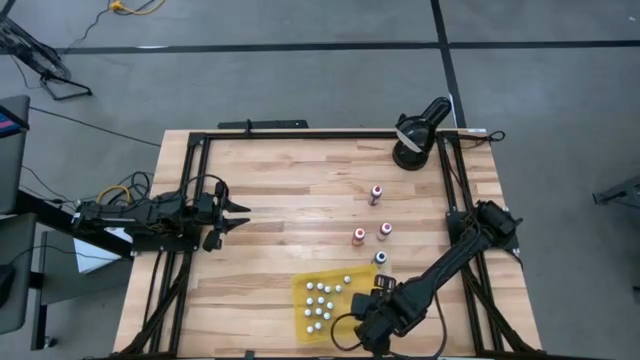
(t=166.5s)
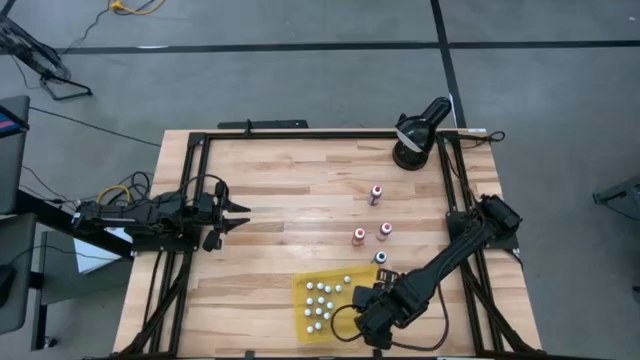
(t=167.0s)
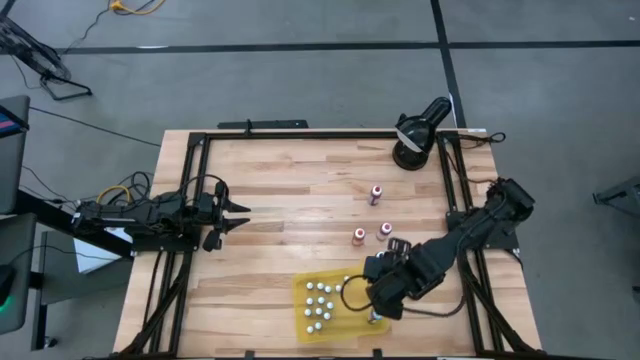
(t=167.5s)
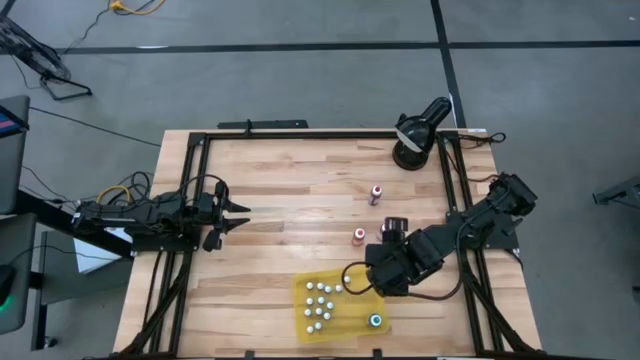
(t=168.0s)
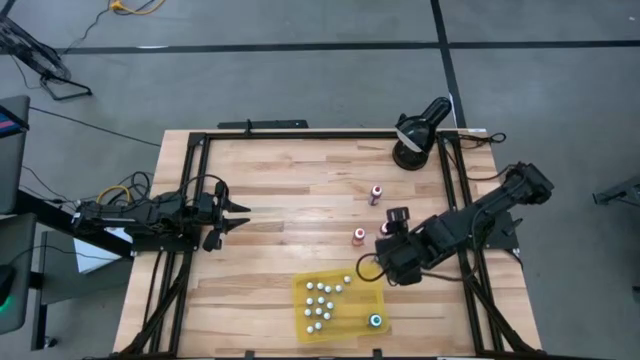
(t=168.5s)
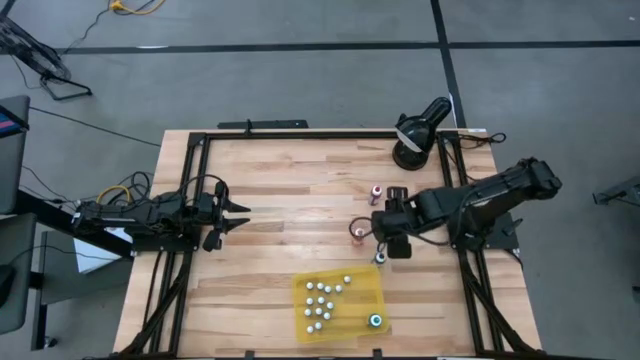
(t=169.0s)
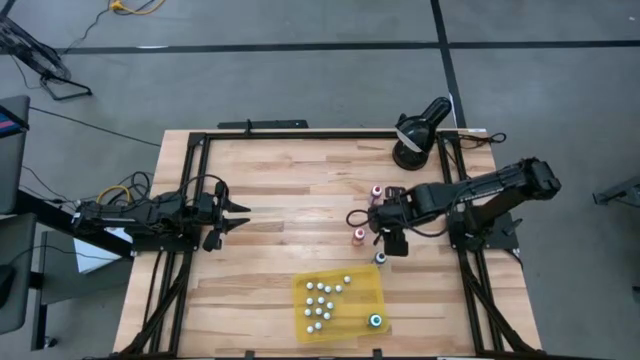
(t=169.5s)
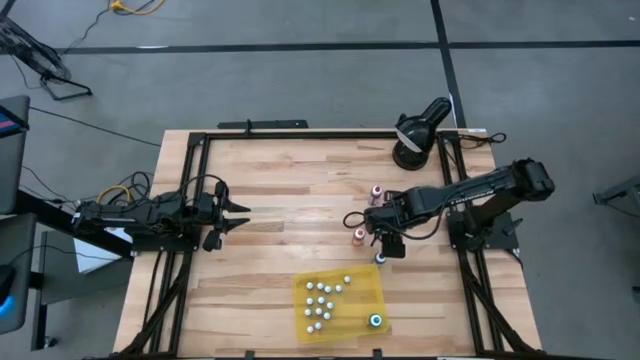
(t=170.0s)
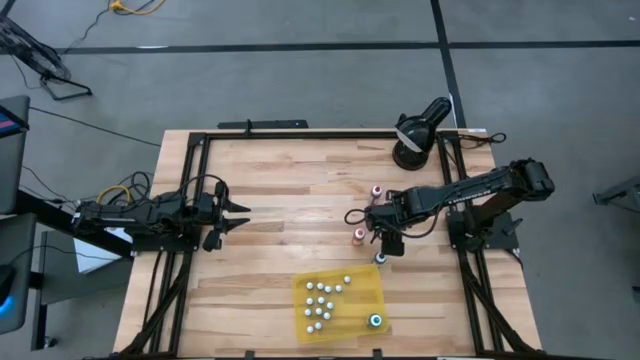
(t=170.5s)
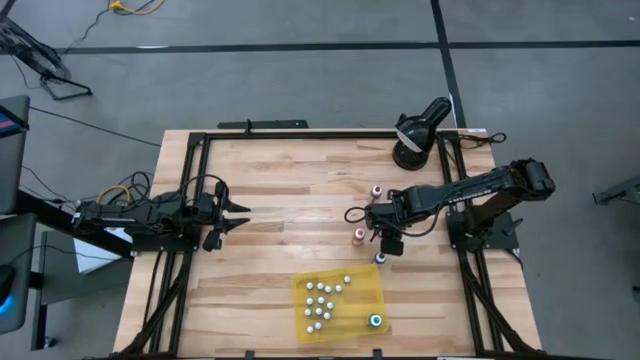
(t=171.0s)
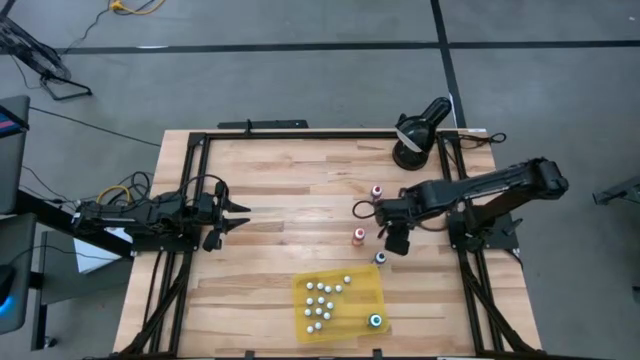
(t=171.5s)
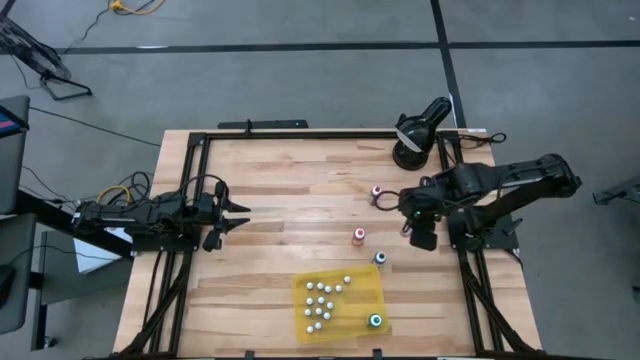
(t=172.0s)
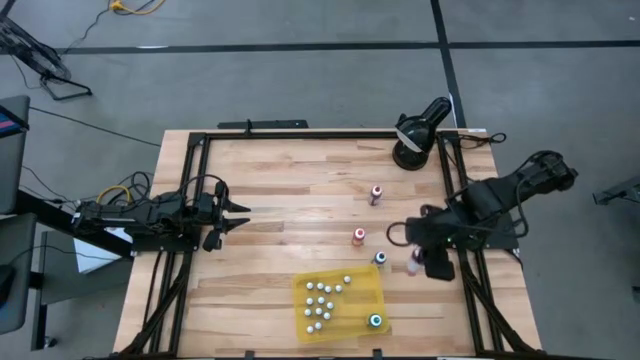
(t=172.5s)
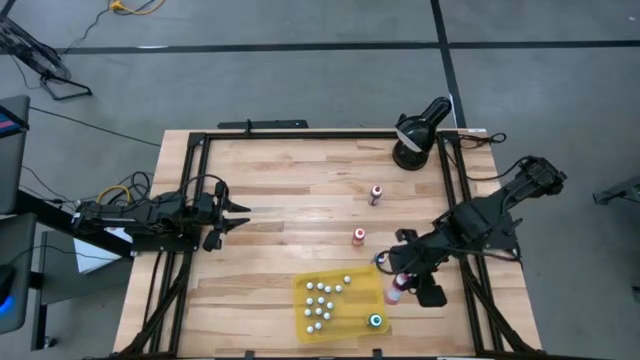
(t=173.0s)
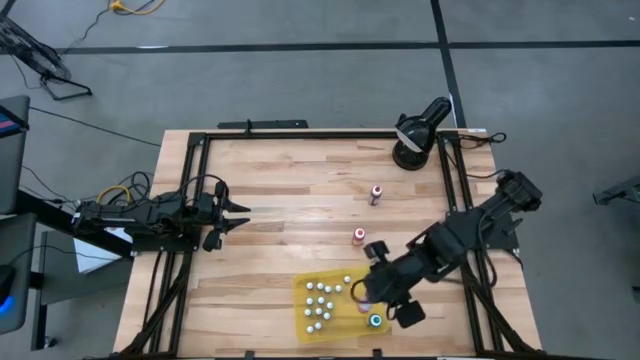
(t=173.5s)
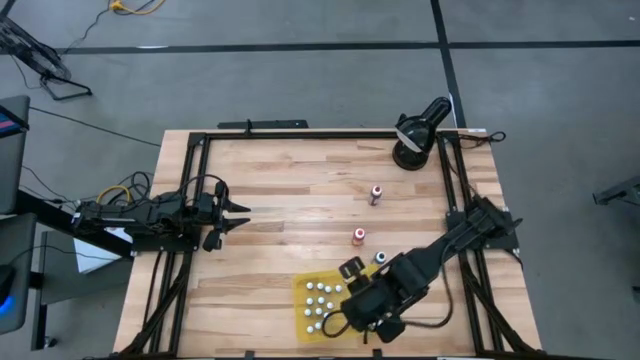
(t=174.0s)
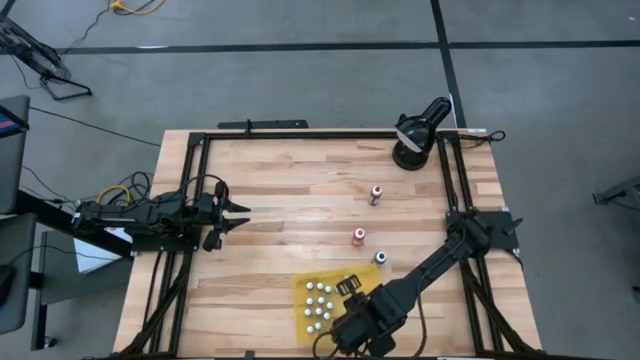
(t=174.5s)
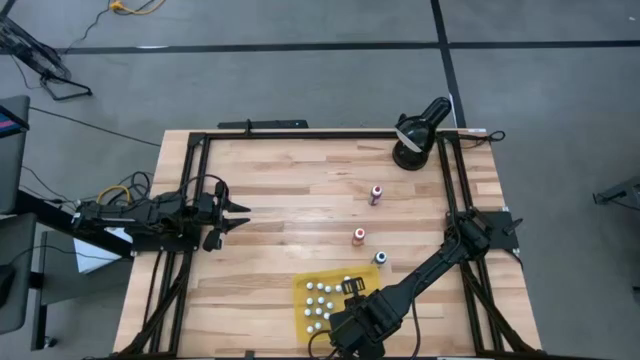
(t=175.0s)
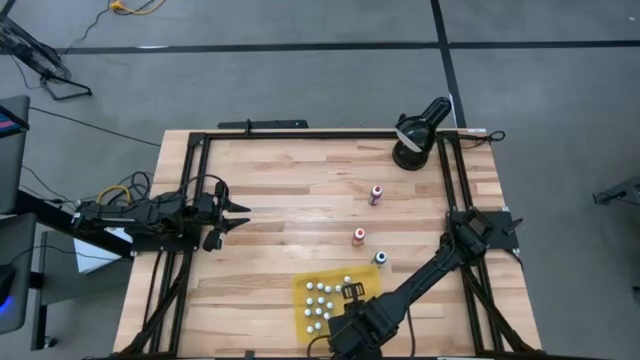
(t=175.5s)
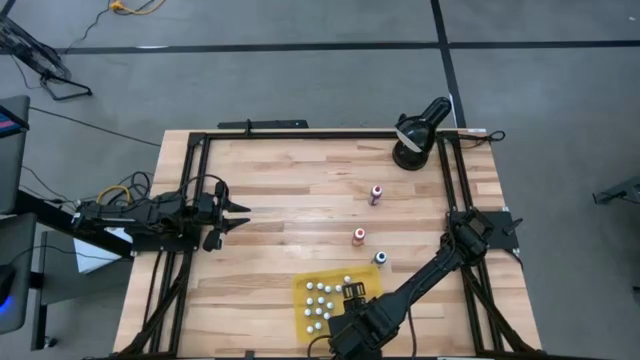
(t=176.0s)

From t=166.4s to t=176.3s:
Task: Pick & Place food coloring
Put the big pink food coloring bottle in the yellow bin

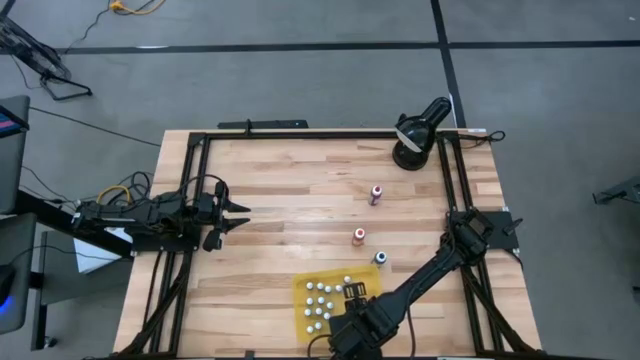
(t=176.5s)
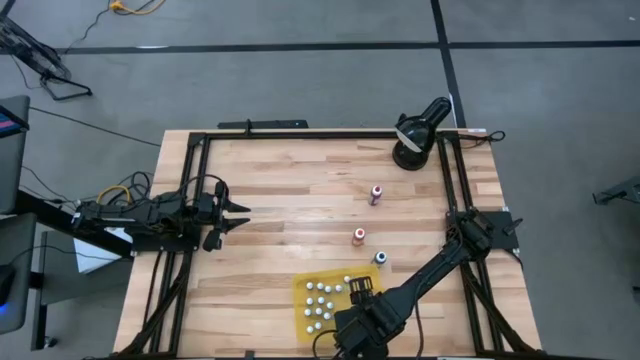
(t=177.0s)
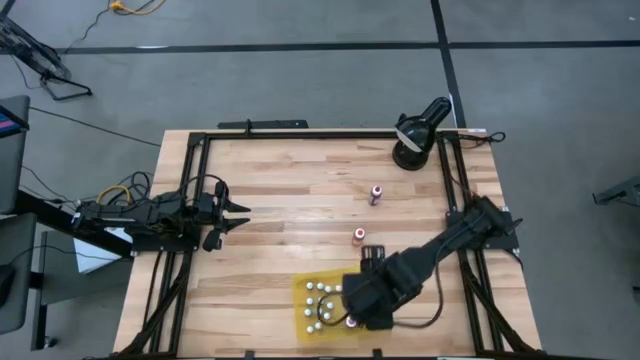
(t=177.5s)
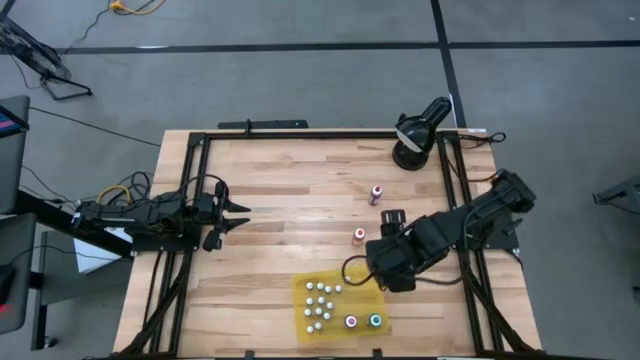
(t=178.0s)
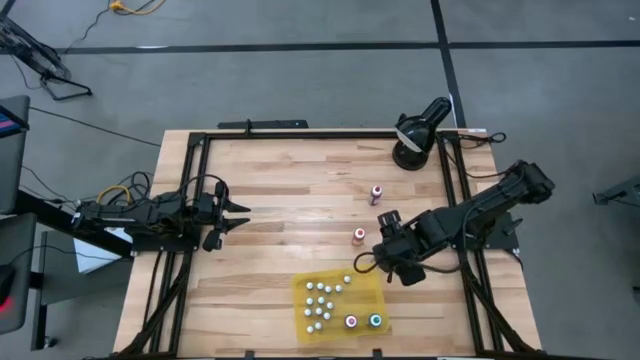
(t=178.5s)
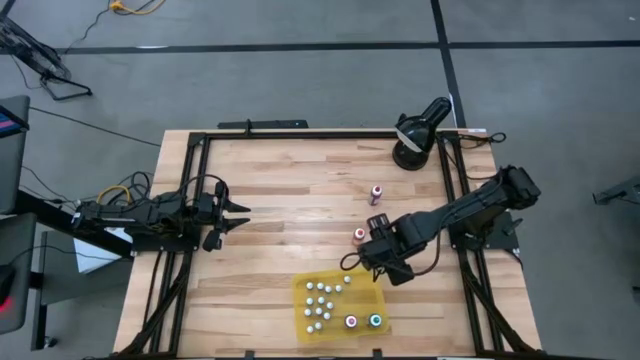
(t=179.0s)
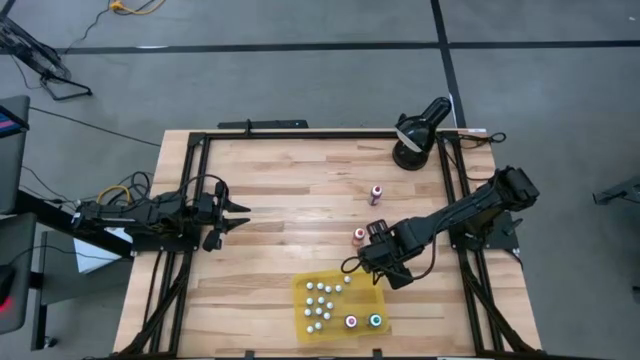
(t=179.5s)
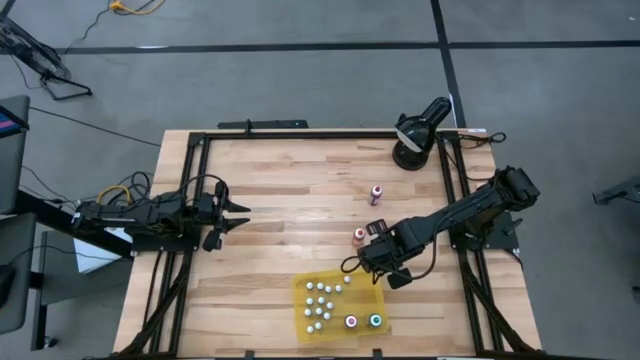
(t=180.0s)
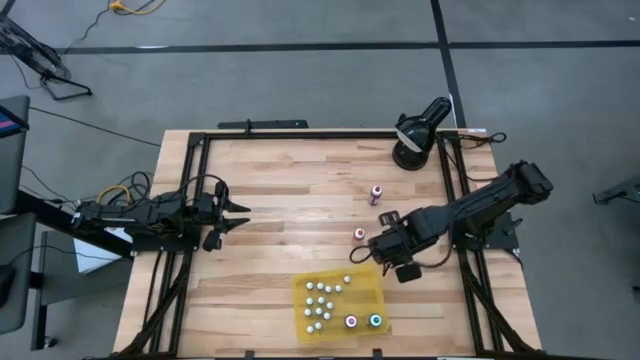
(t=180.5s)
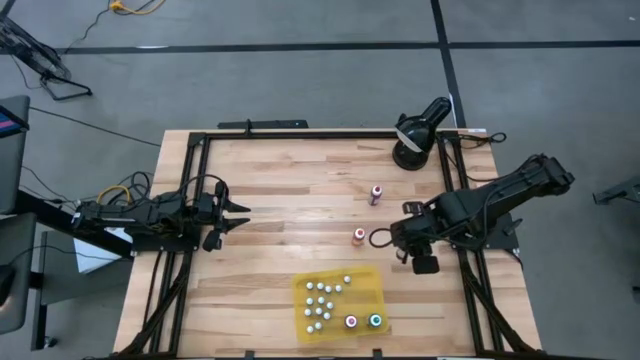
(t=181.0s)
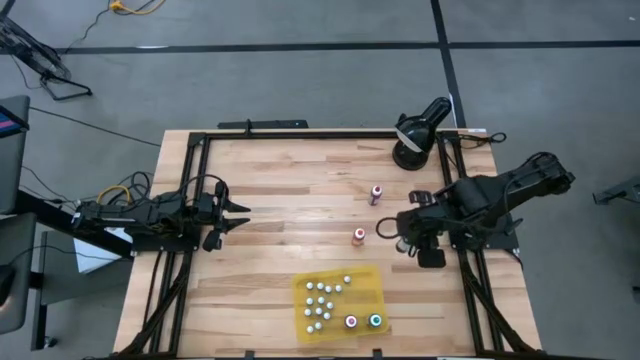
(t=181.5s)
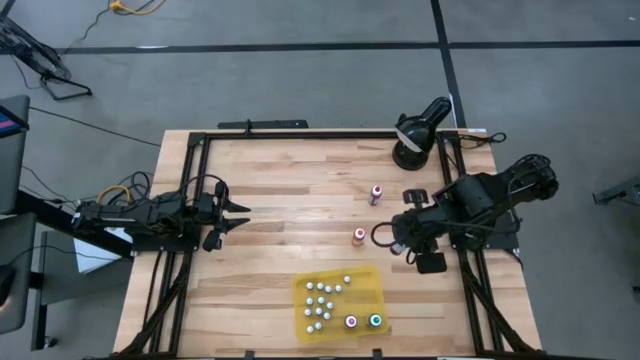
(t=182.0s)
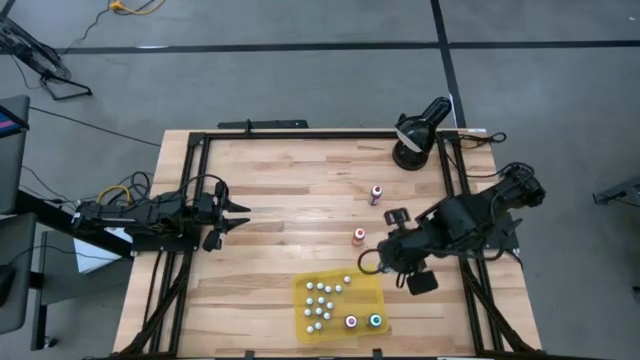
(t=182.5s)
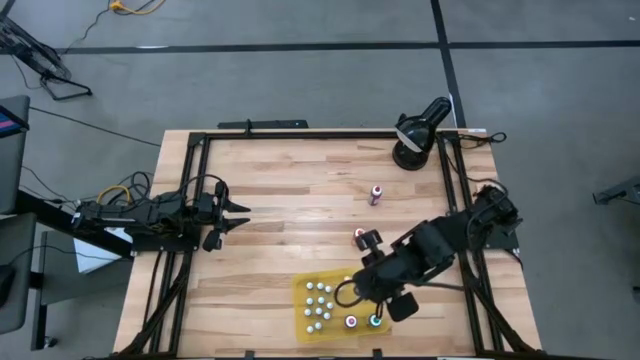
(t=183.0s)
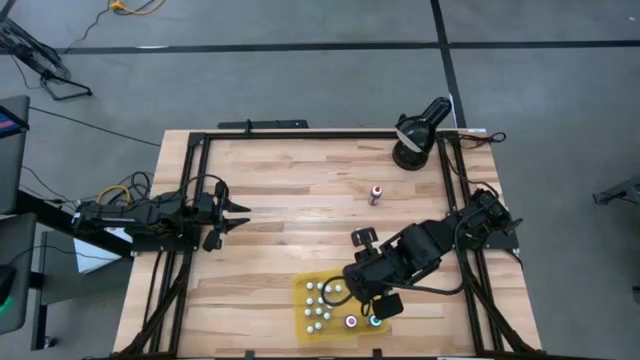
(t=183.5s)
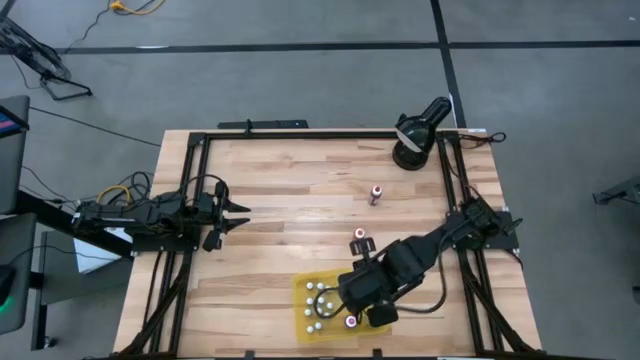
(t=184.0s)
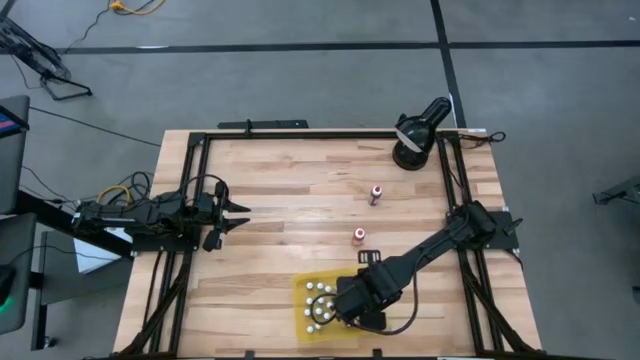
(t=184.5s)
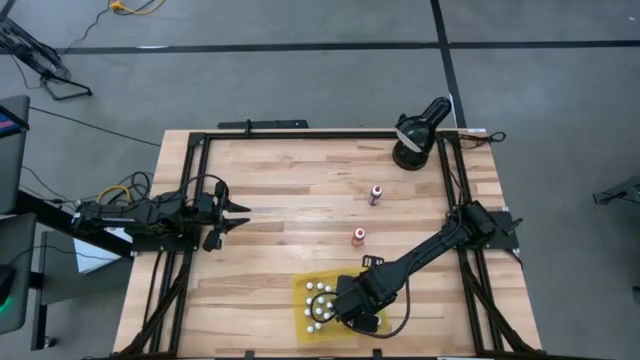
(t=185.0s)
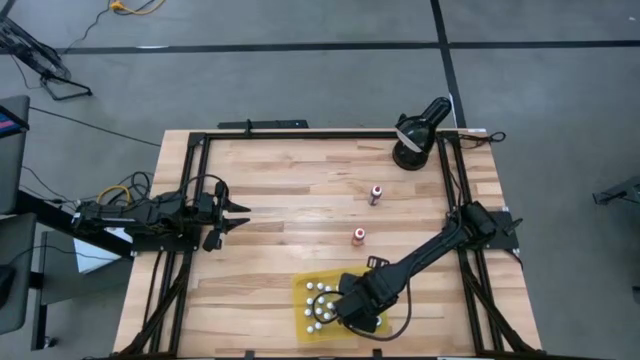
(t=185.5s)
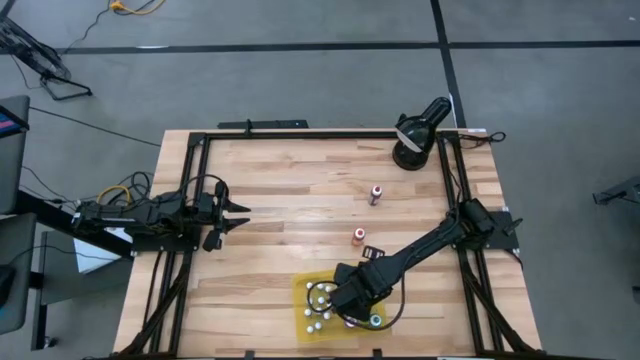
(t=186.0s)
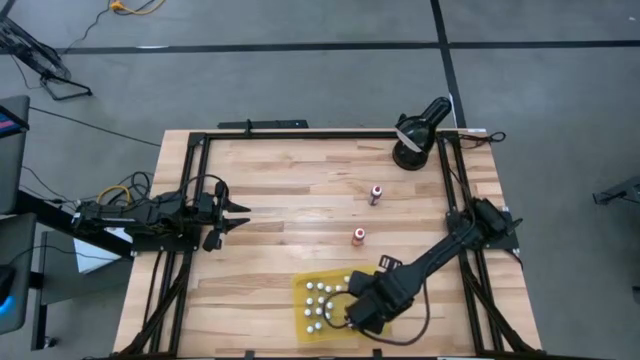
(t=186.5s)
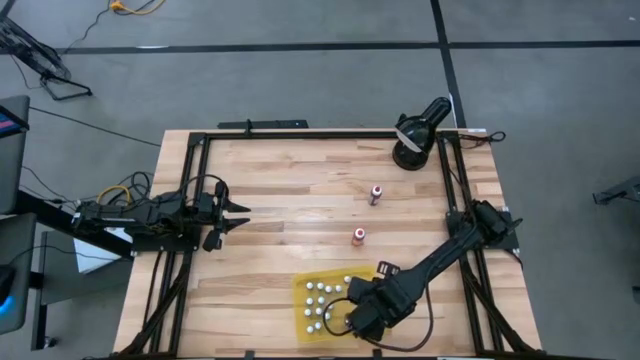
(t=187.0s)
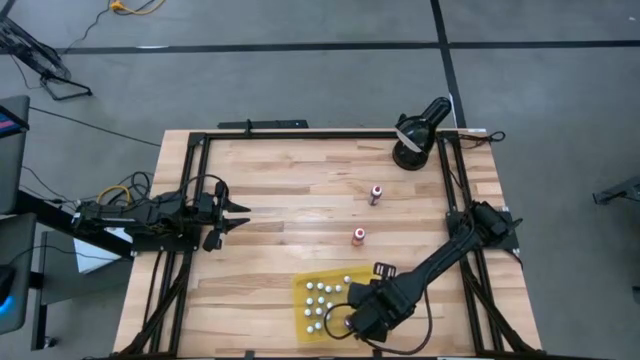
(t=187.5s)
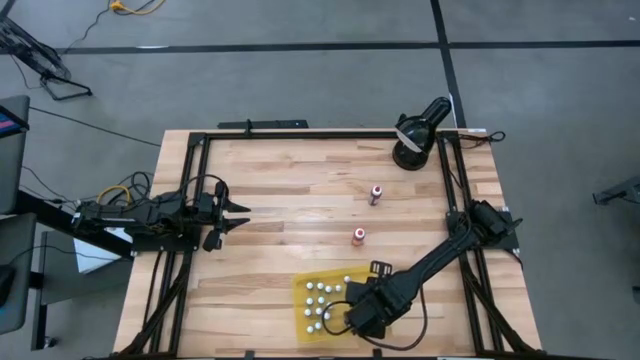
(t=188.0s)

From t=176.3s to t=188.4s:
Put the big black food coloring bottle in the yellow bin
